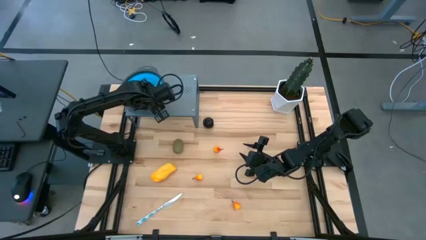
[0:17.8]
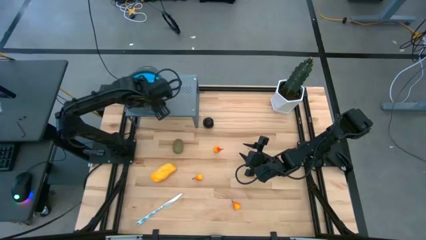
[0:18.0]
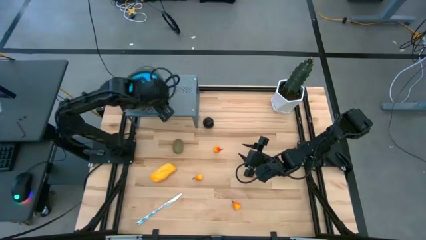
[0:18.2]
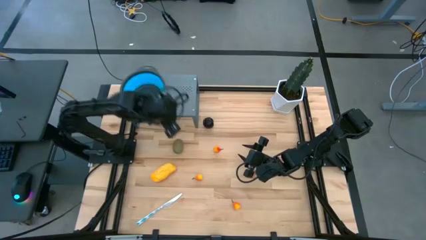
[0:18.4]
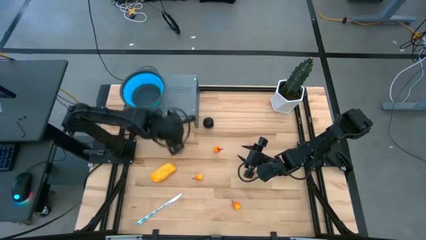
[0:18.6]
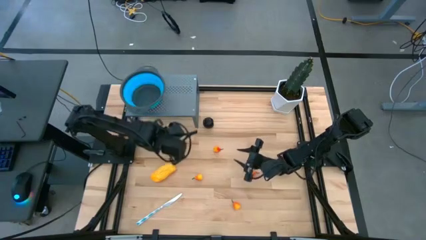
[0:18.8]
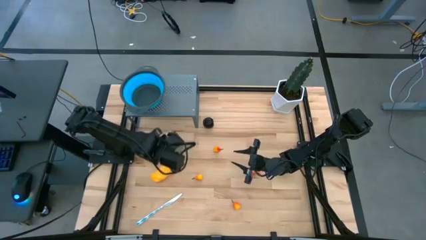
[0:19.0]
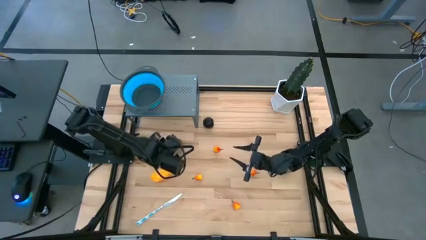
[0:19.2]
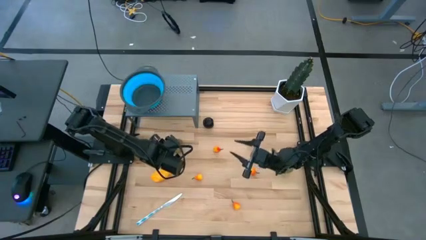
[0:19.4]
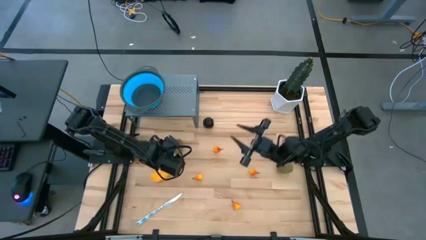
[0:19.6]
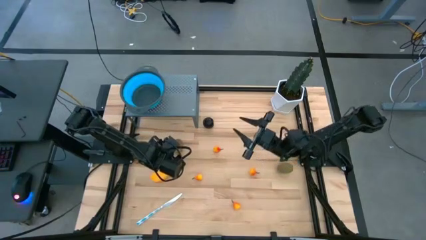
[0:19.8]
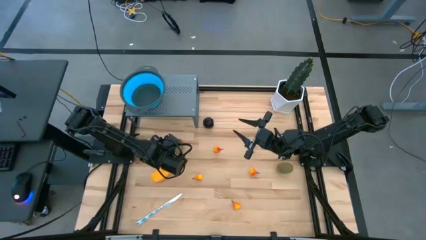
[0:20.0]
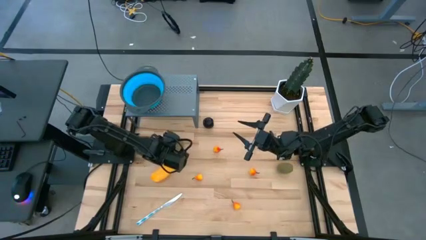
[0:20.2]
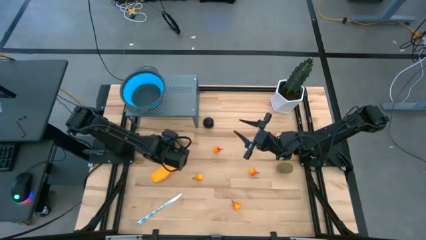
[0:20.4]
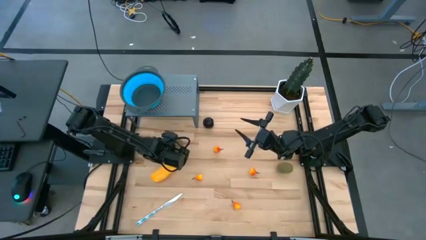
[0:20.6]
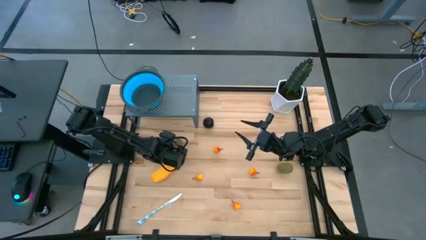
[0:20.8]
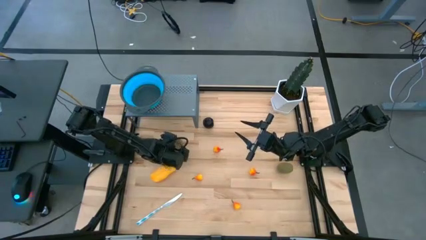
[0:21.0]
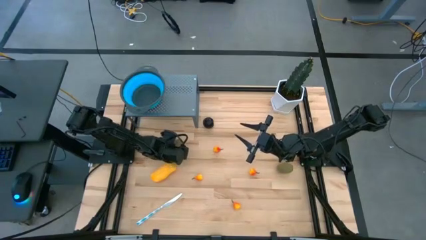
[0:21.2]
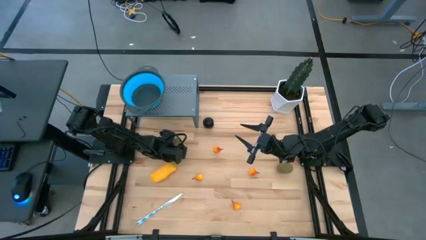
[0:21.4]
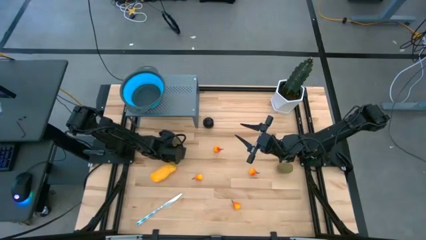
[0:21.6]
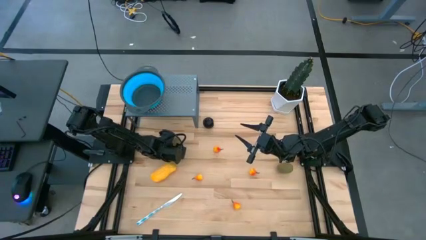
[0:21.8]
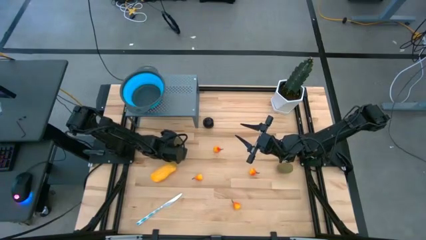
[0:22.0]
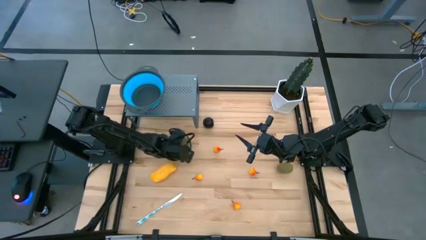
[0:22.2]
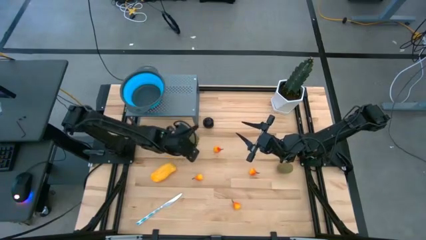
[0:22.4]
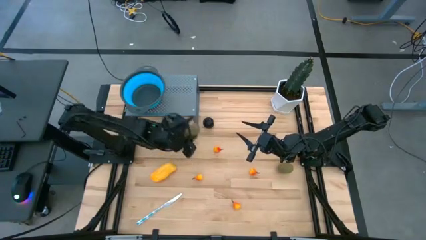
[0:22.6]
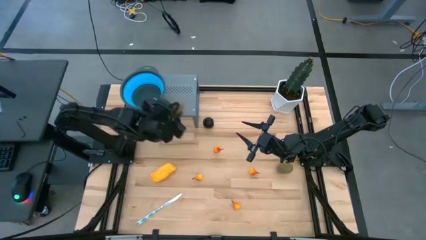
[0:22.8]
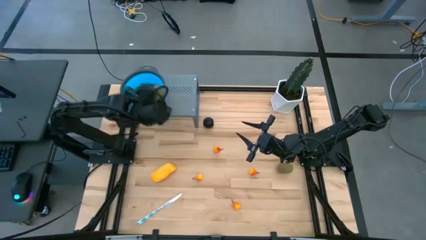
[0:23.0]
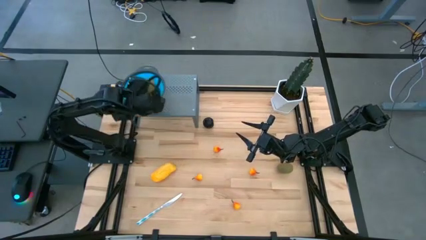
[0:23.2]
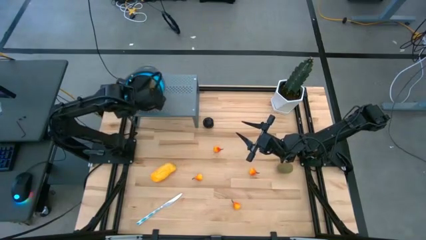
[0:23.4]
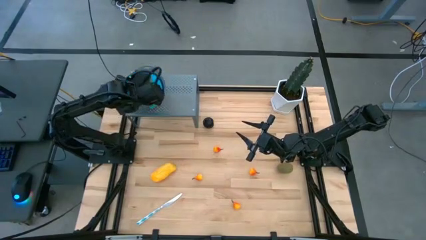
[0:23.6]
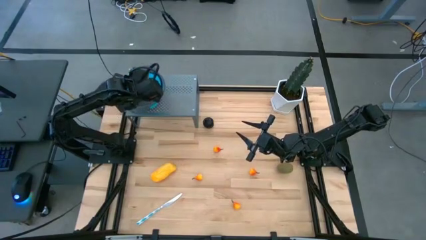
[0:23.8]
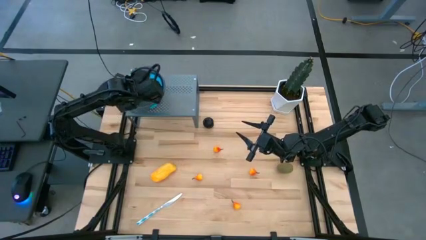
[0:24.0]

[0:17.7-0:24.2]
Task: Pick & Place Fruit
Put the left brown kiwi into the blue strainer bowl on the shelf

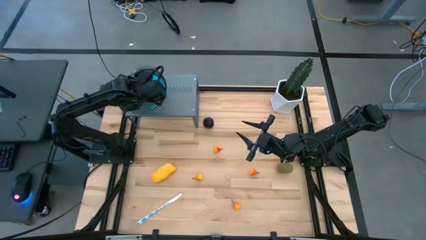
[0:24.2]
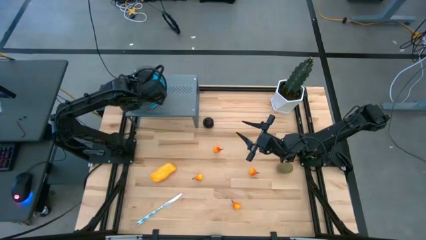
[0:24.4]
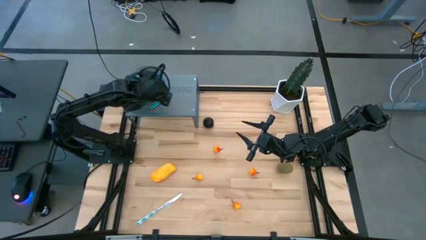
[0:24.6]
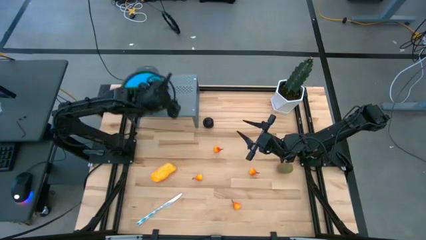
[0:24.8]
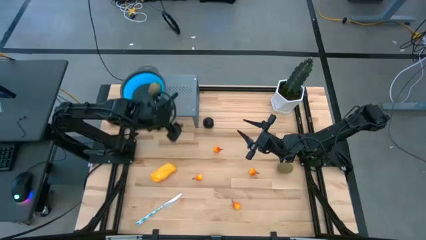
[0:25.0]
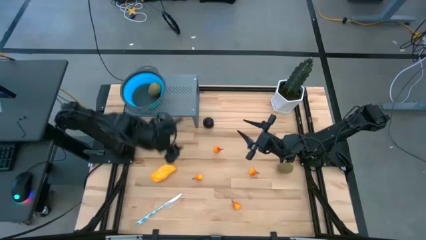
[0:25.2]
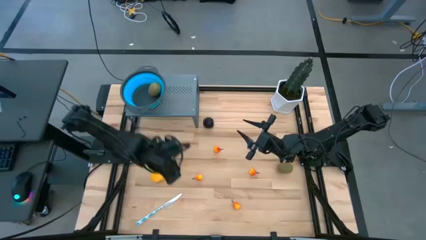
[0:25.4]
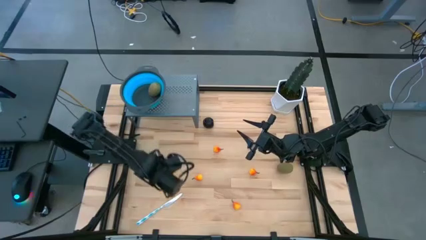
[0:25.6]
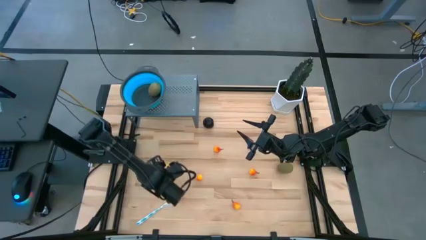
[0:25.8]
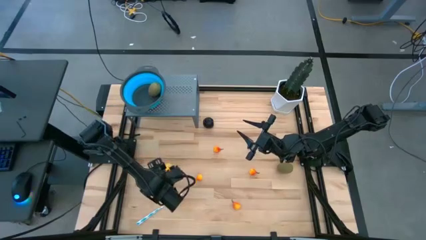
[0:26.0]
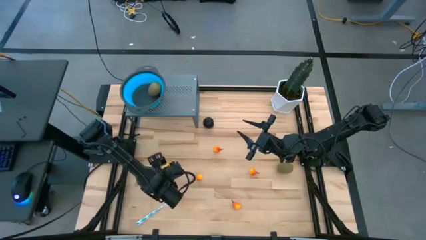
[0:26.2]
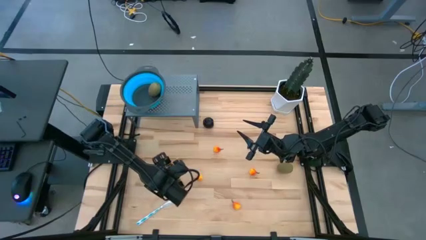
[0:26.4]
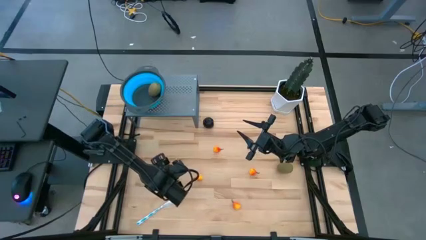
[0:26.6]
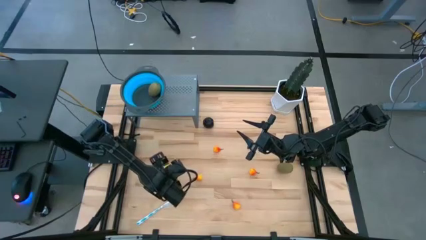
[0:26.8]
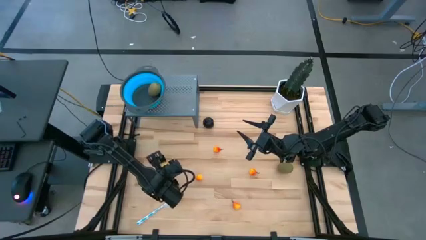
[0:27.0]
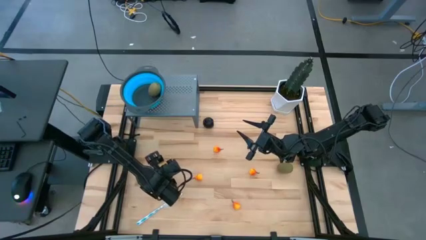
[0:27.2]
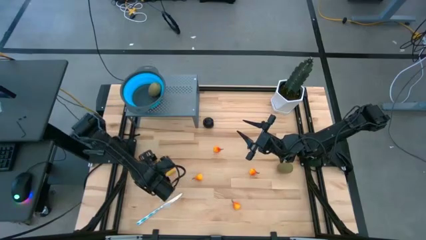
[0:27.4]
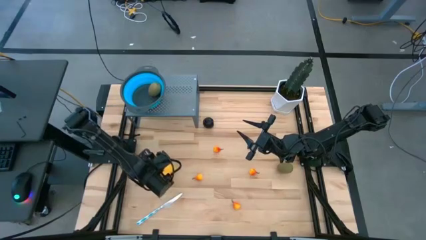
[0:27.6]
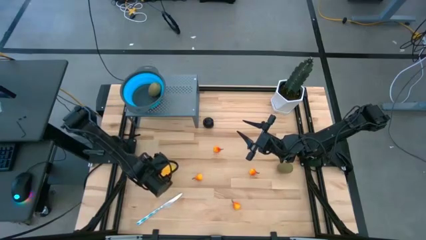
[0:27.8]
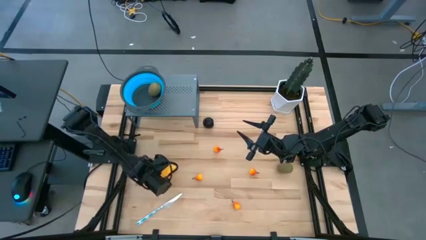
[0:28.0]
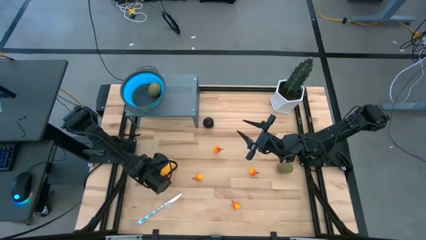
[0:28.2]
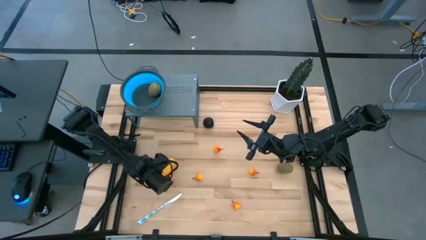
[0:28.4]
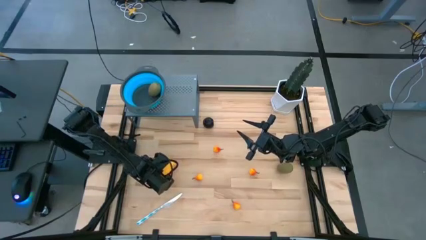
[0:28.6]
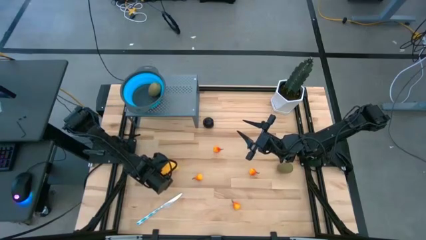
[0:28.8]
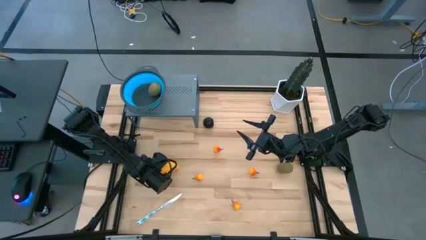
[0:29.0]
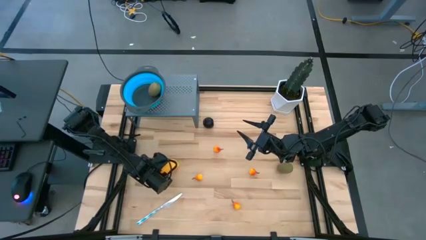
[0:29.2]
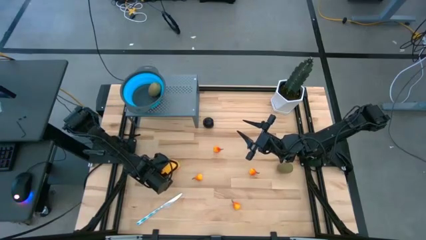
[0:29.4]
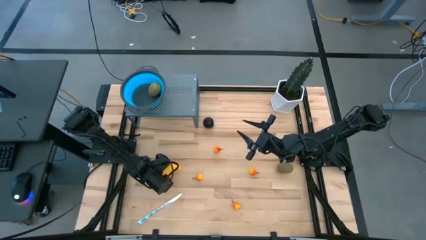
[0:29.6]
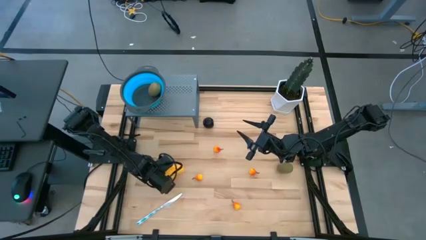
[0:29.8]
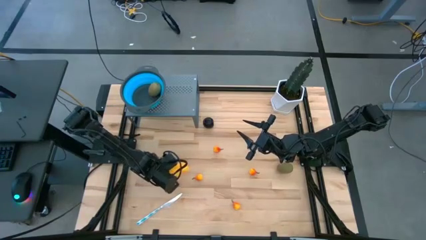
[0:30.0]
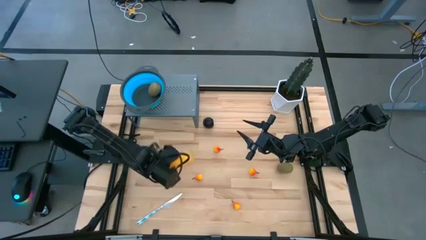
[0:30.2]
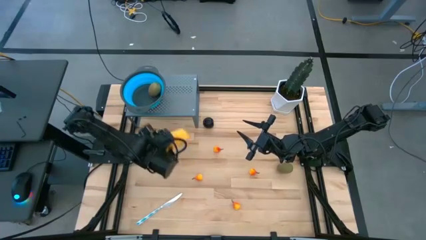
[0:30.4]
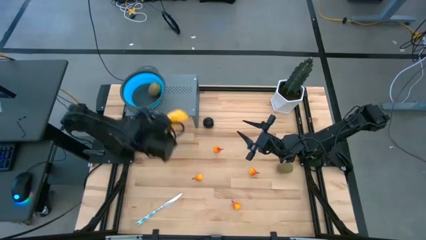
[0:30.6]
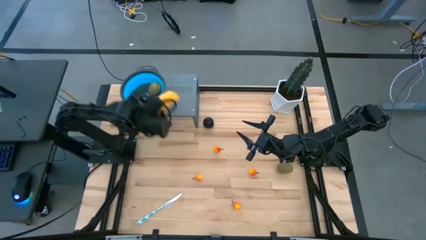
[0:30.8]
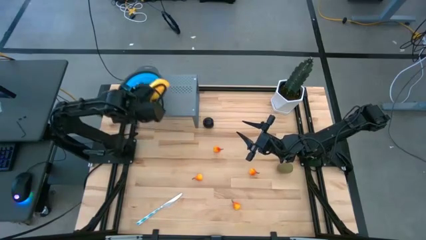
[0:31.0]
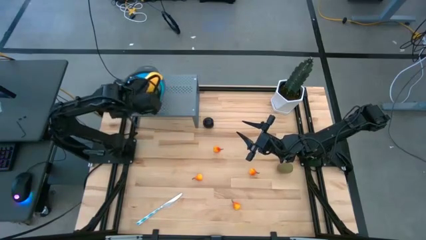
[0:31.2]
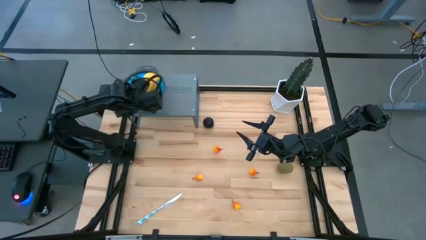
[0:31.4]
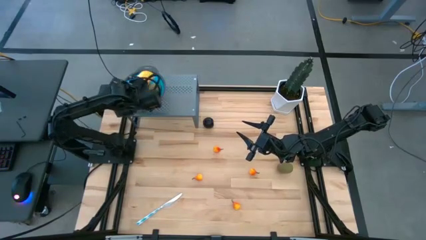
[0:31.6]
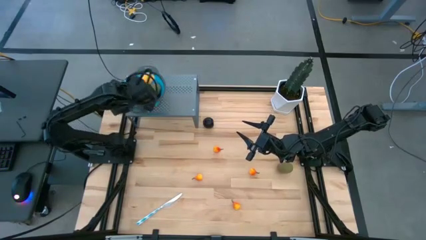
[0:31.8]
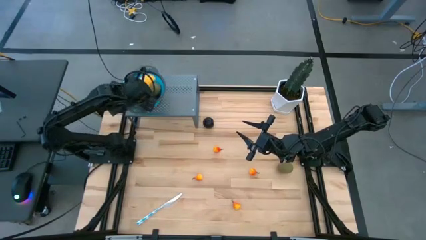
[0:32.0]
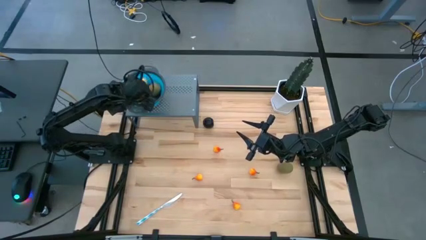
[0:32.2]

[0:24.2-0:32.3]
Put the yellow mango into the blue strainer bowl on the shelf
